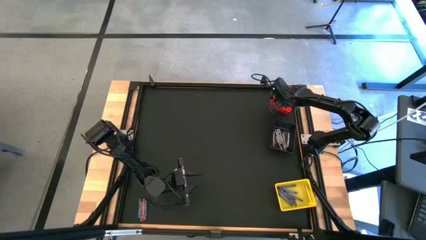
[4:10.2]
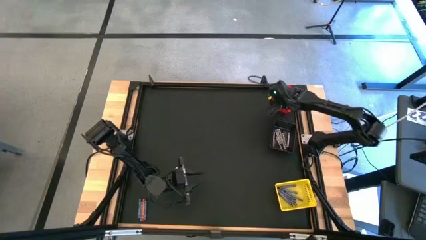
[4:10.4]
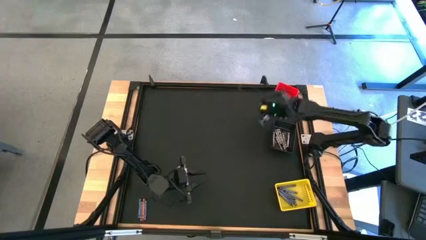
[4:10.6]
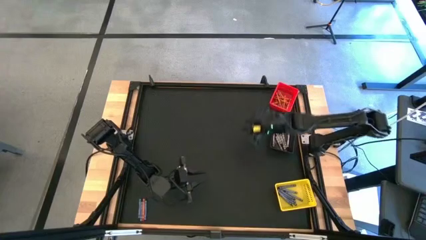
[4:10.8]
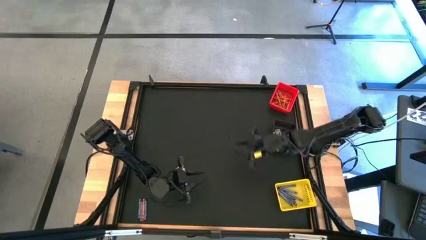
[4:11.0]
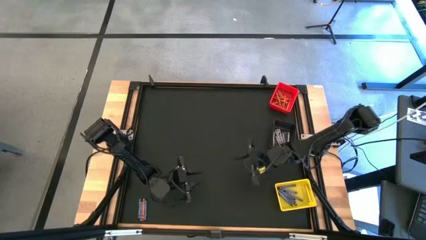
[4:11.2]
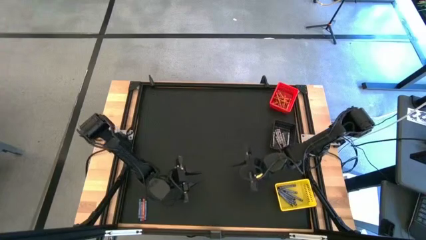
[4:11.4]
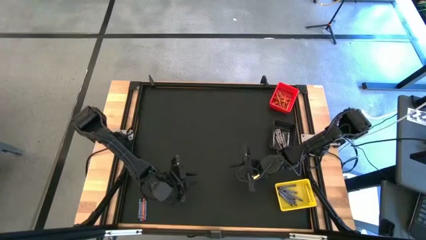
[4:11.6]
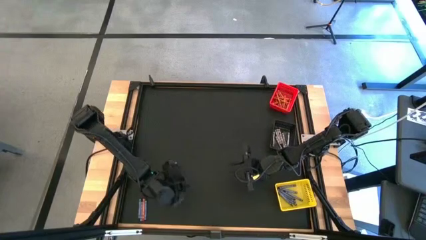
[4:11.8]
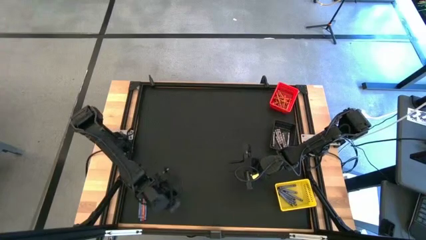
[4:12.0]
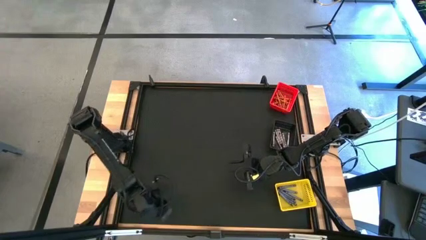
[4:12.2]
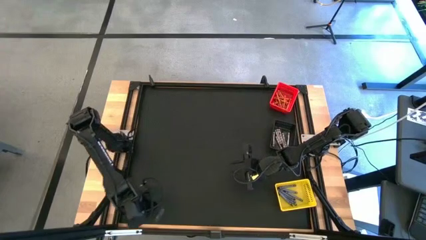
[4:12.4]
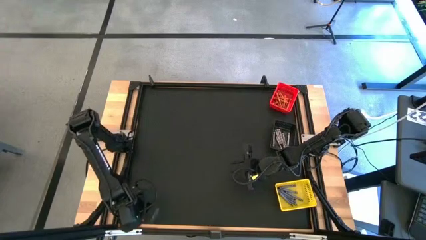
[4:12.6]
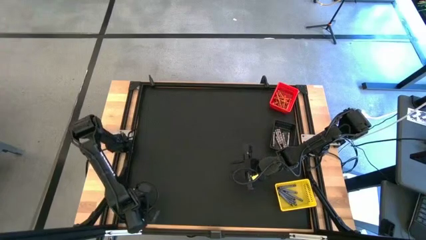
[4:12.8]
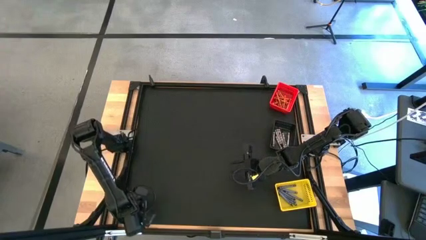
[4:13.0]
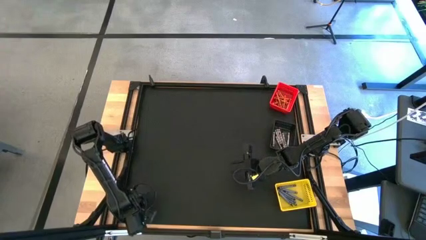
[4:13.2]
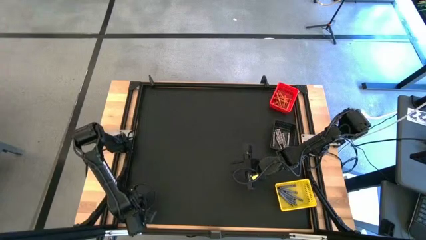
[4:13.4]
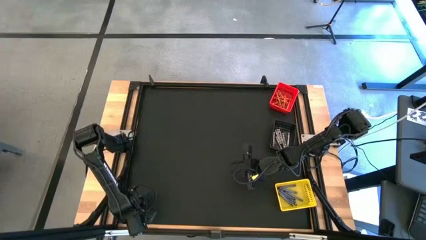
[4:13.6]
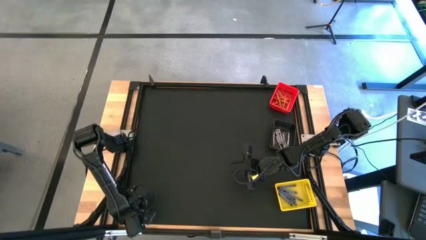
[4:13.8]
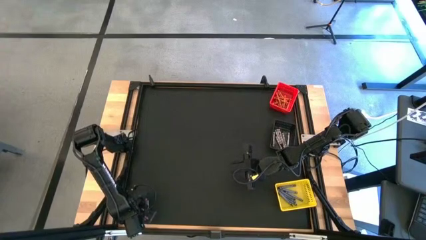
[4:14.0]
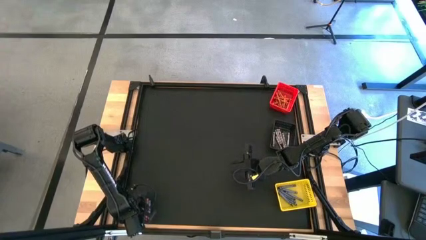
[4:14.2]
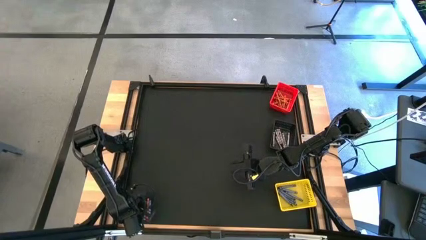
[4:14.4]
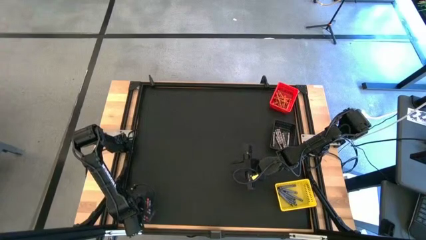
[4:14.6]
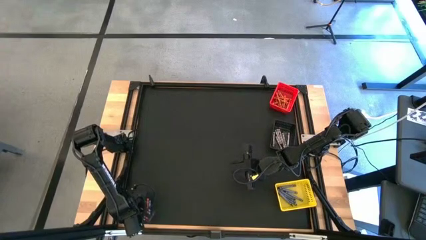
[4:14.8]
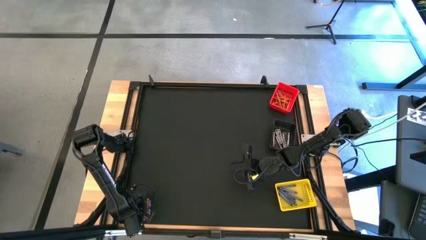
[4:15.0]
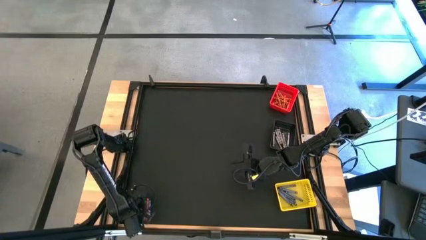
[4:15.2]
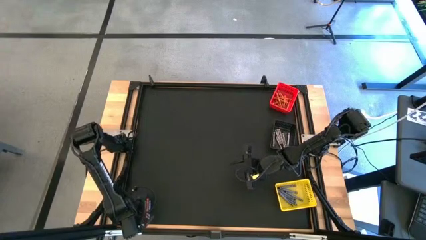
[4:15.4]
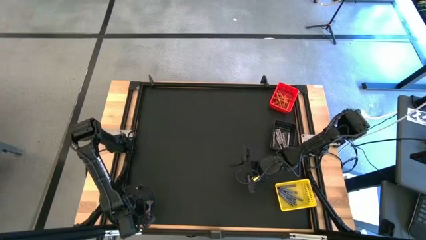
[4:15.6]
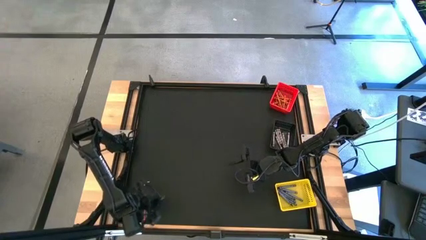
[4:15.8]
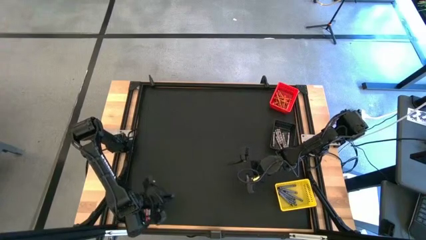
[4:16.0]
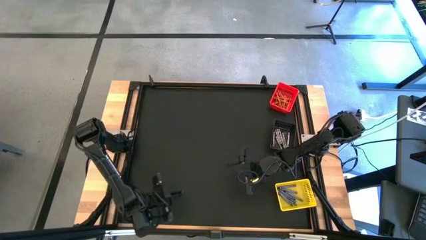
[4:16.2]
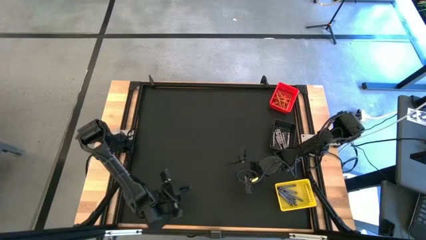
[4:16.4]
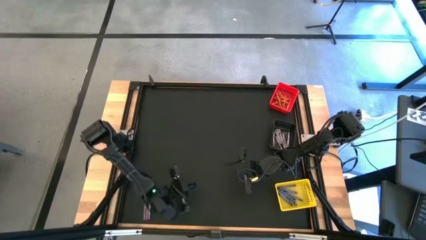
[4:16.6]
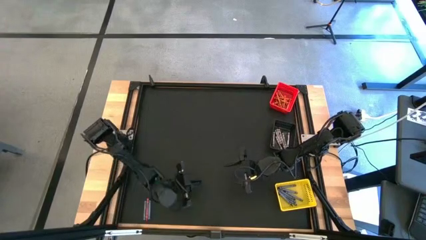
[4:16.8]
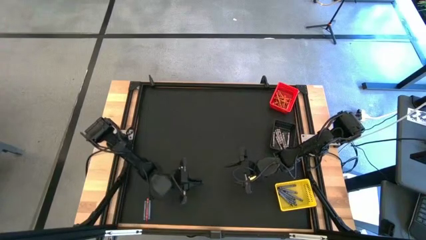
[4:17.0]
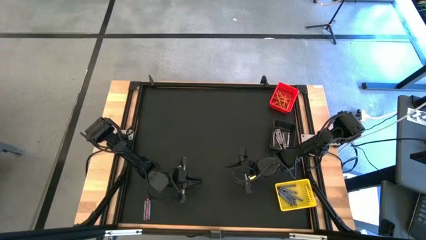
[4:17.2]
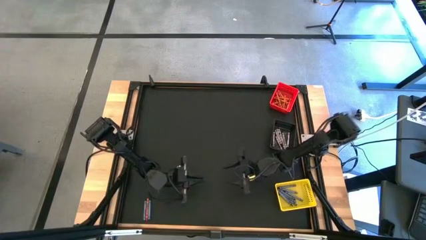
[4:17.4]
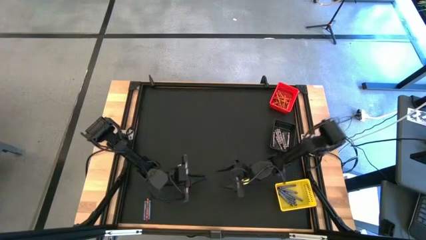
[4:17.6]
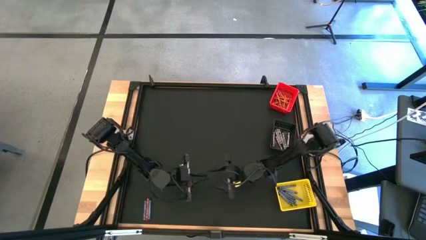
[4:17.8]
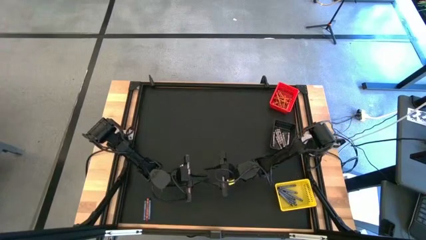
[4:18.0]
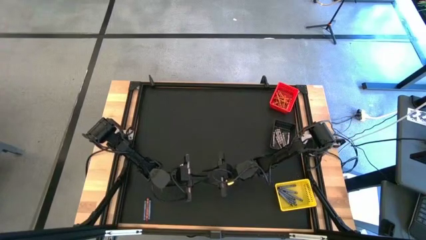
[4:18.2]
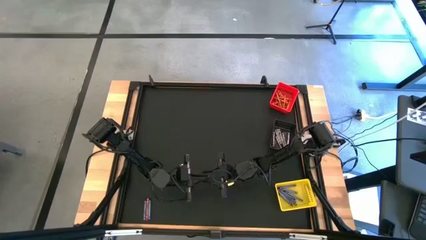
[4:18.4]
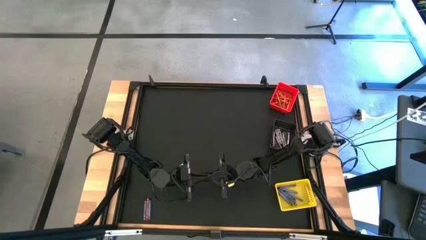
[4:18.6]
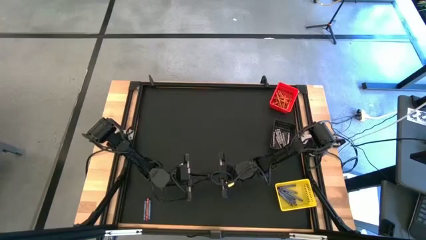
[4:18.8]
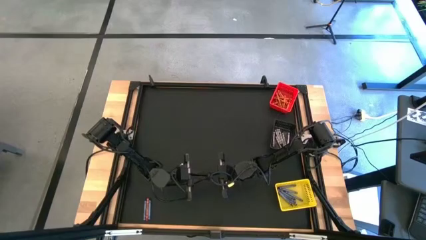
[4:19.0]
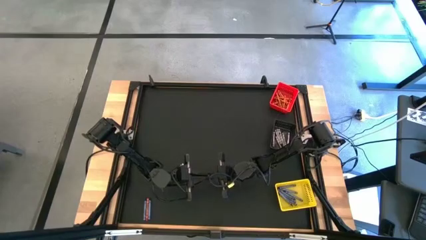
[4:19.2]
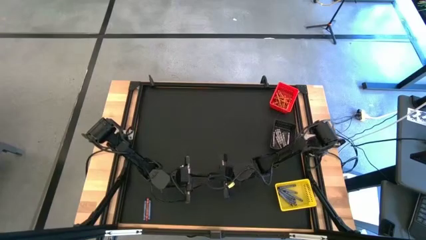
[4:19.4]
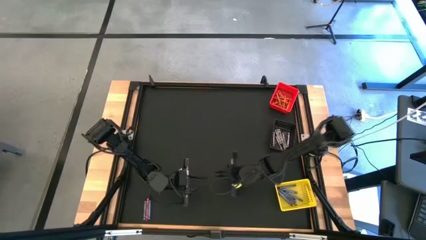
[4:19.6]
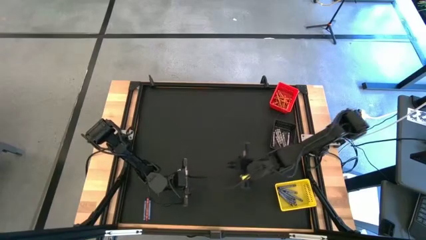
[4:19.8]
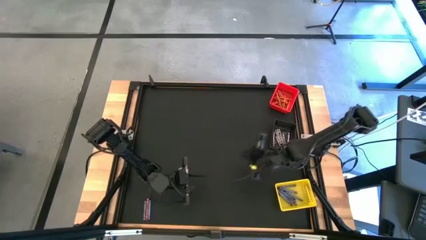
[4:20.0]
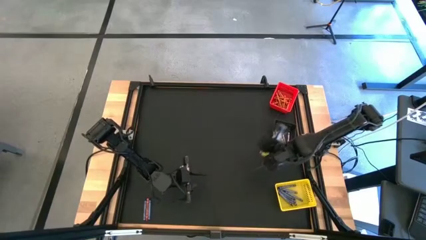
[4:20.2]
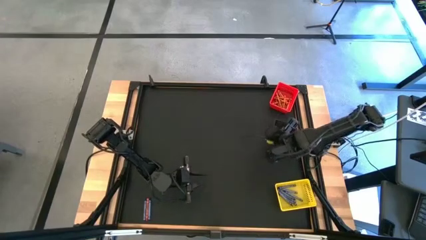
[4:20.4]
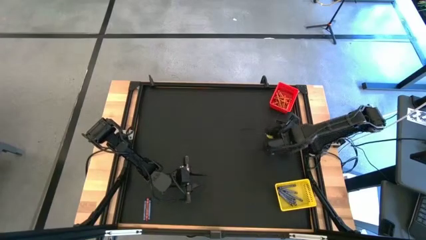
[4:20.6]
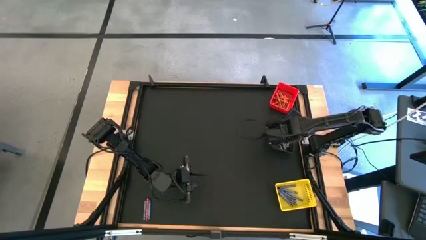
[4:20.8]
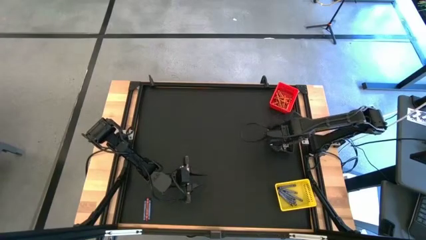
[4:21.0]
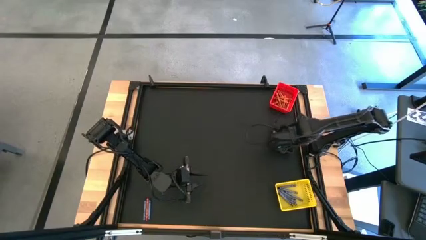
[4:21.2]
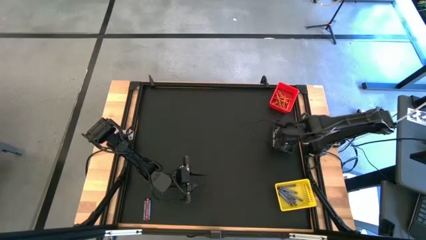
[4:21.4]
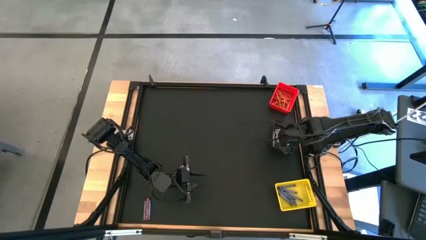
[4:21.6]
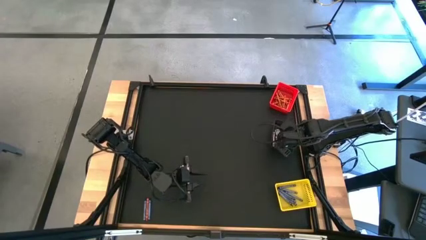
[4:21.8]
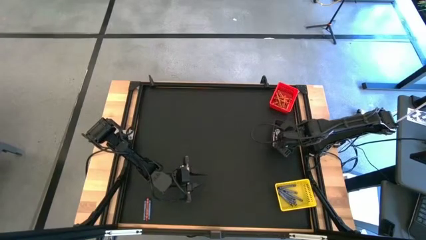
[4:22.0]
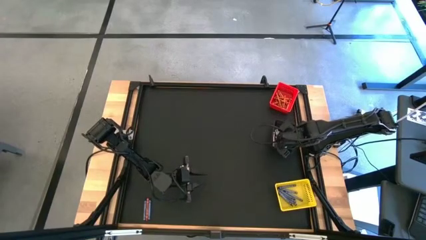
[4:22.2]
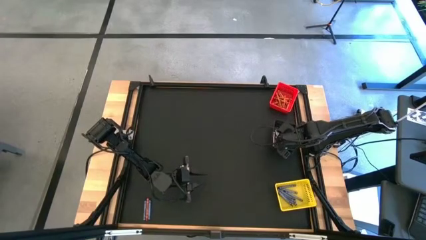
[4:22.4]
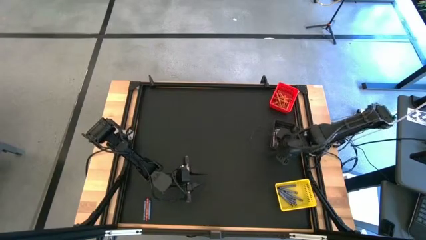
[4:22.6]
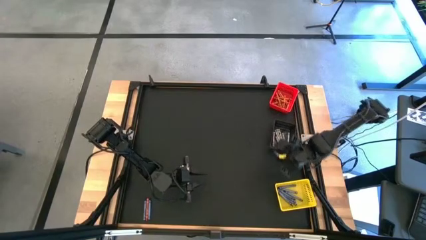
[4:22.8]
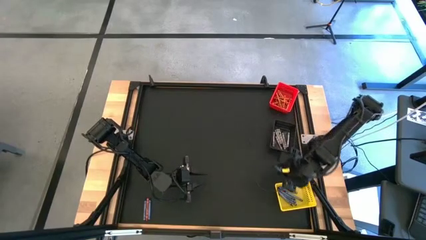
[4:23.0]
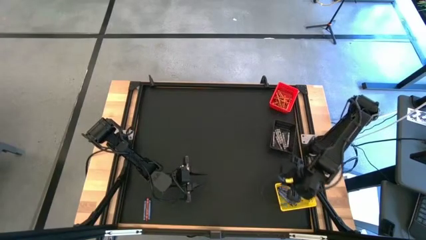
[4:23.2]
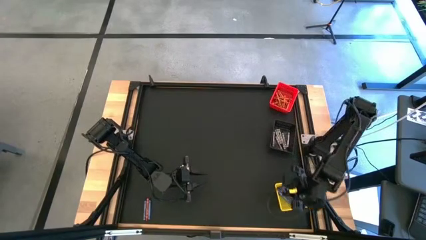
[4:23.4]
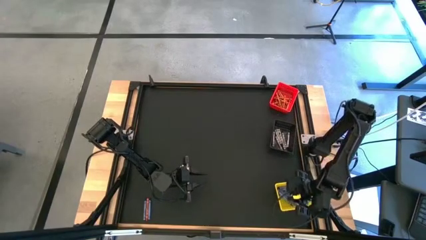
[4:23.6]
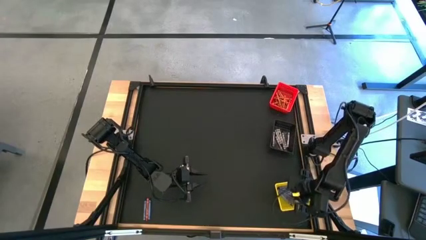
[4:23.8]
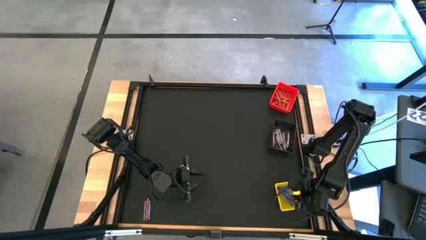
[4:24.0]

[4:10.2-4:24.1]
Task: Sort crayons
Put the blue crayon into the yellow bin

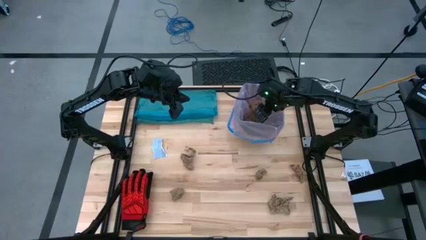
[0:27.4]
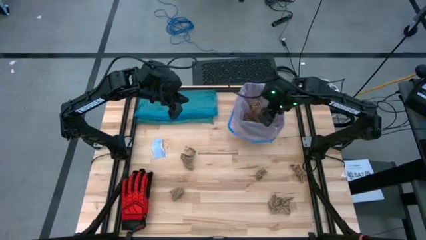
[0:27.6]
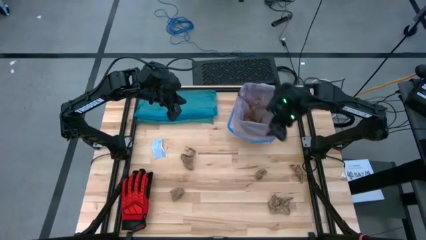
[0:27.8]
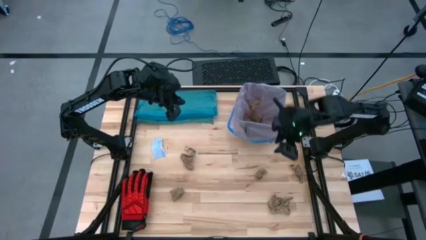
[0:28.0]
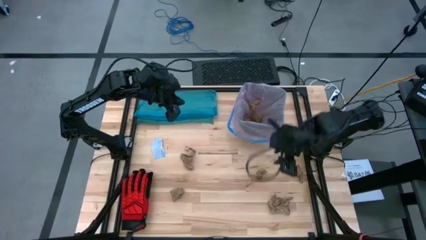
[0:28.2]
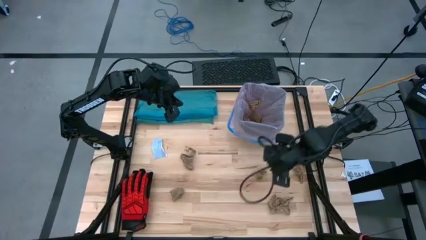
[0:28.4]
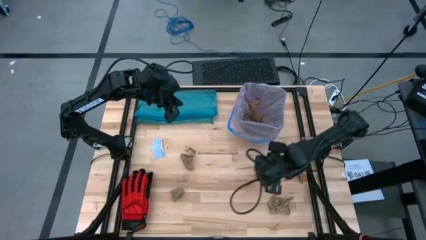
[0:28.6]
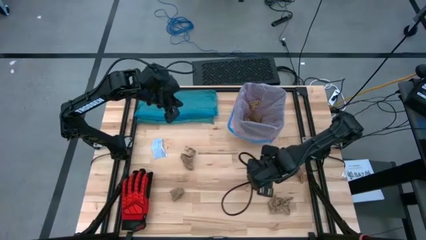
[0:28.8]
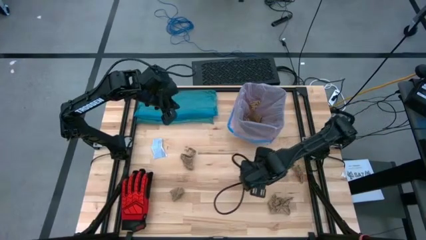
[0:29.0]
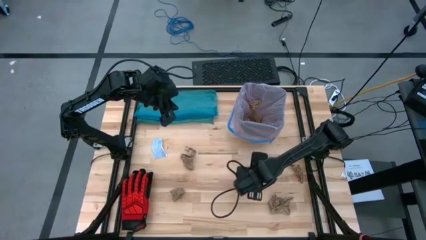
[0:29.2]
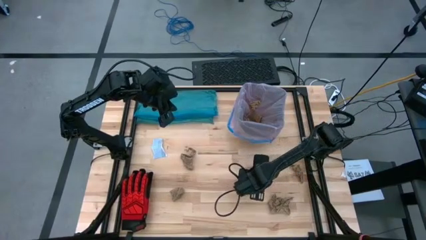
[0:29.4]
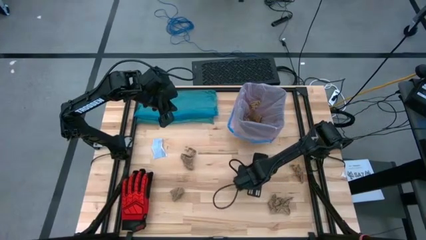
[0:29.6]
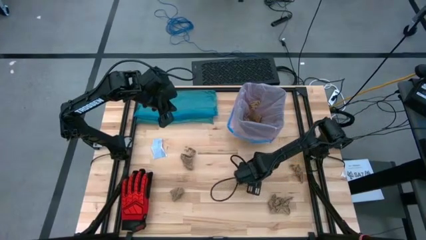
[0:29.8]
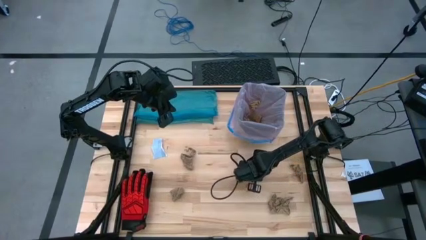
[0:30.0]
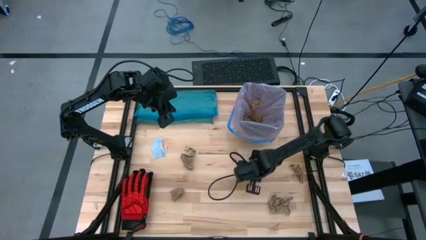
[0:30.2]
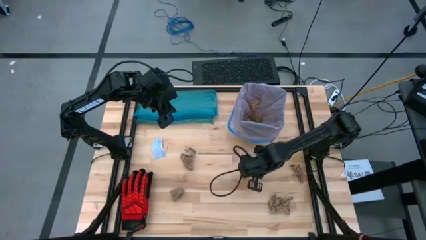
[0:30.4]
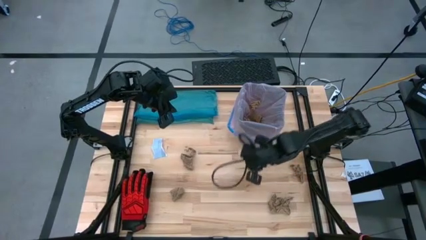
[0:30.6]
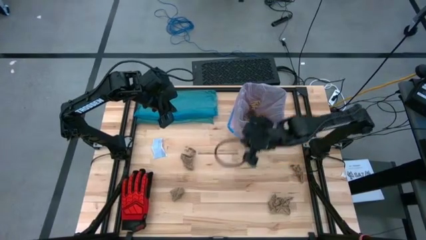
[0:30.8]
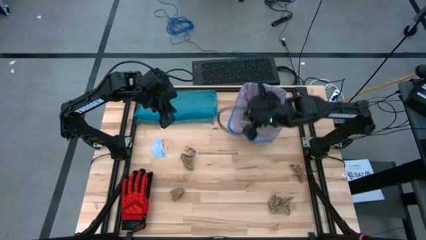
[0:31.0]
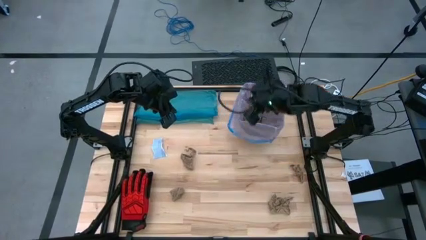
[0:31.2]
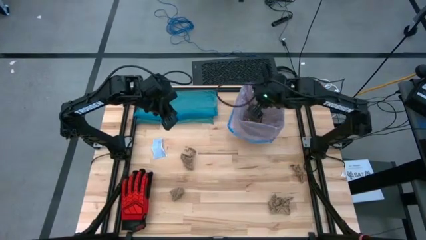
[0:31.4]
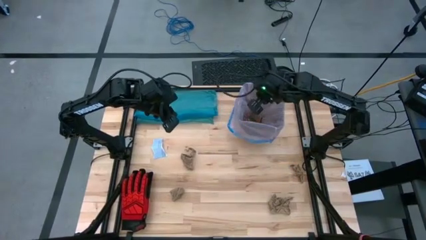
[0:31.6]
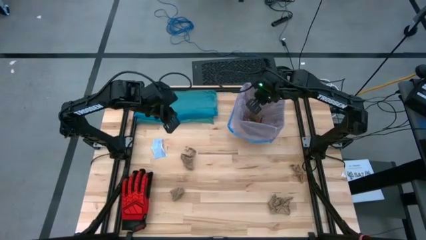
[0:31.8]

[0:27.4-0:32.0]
Task: place trash/remove bag and relplace
Put the brown napkin into the trash bin
